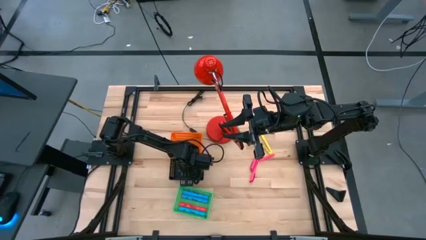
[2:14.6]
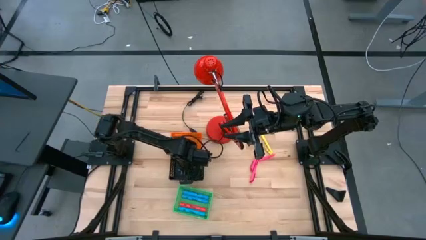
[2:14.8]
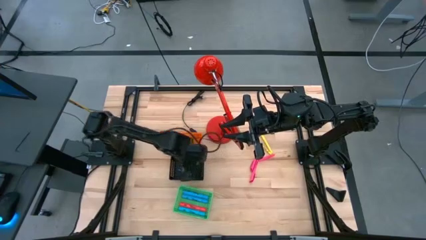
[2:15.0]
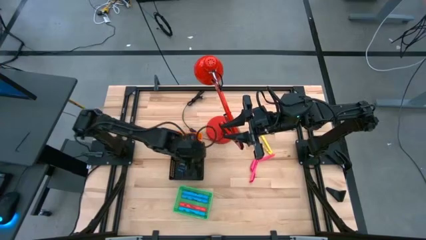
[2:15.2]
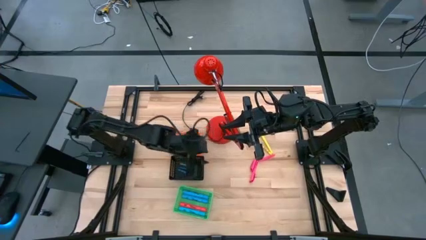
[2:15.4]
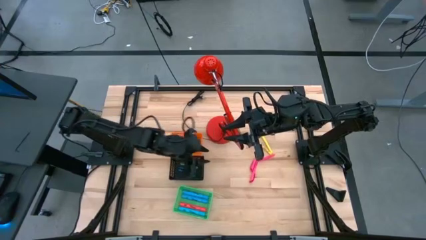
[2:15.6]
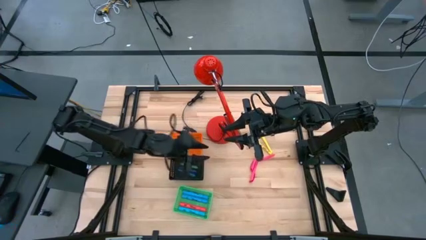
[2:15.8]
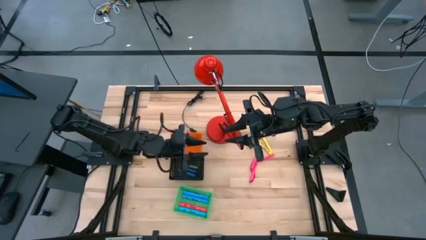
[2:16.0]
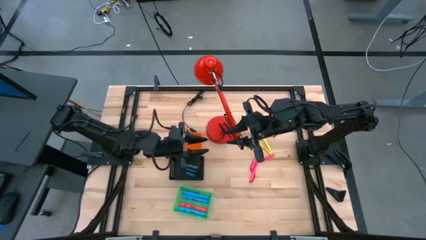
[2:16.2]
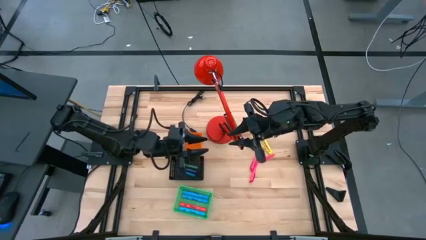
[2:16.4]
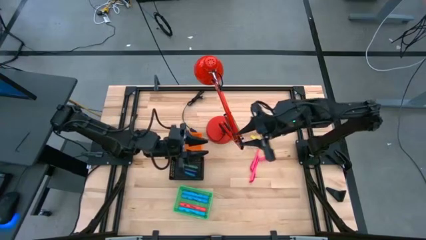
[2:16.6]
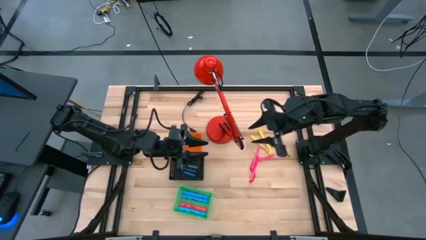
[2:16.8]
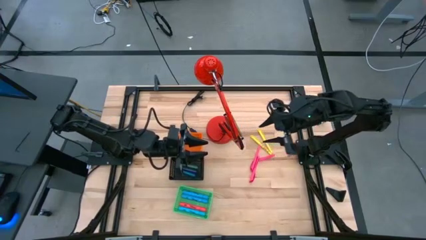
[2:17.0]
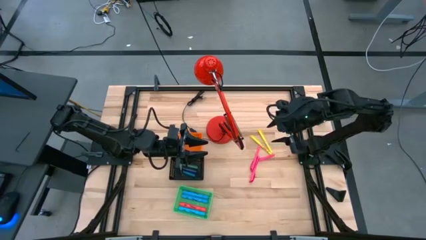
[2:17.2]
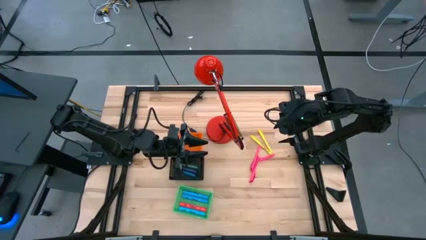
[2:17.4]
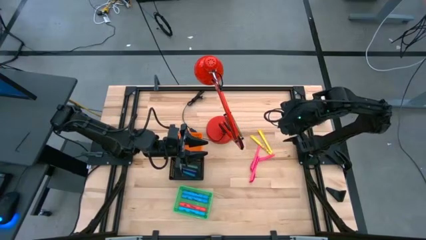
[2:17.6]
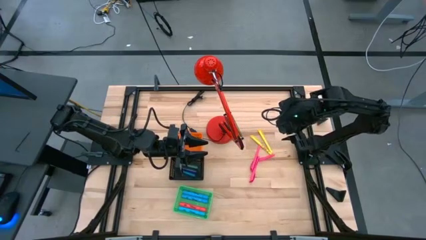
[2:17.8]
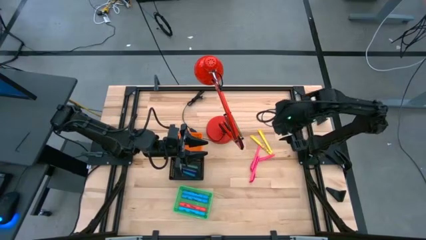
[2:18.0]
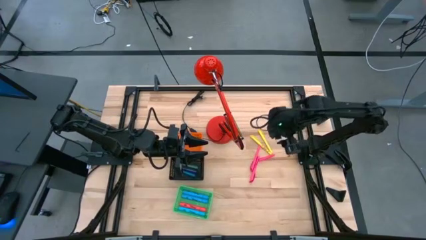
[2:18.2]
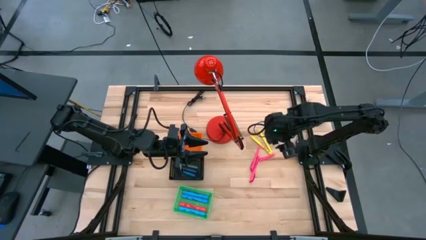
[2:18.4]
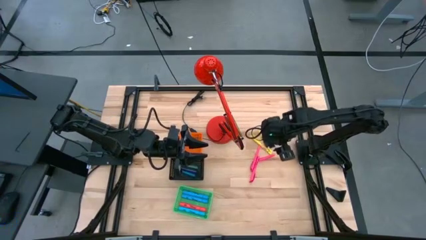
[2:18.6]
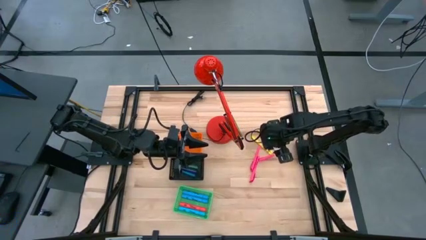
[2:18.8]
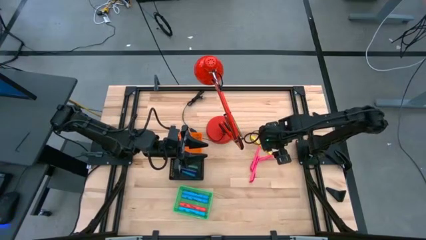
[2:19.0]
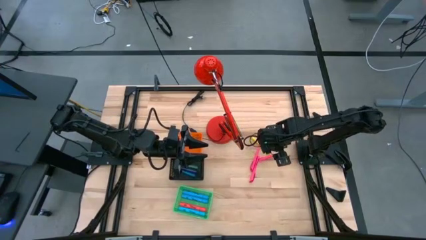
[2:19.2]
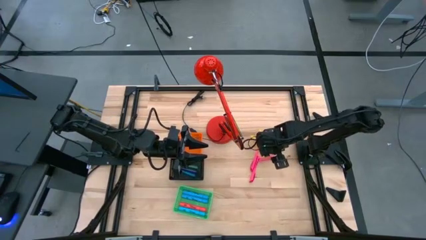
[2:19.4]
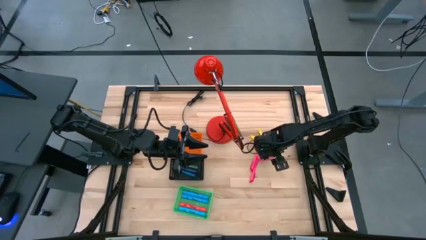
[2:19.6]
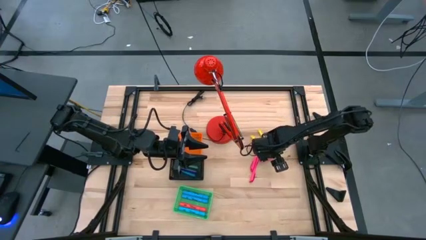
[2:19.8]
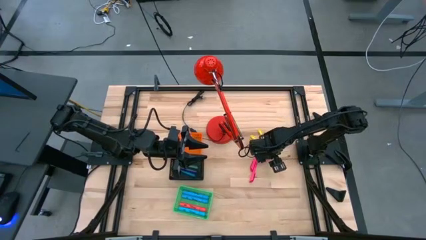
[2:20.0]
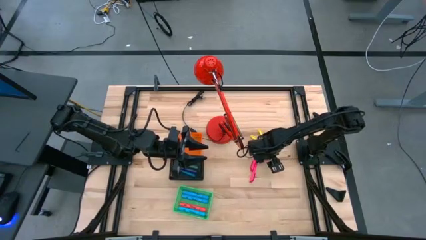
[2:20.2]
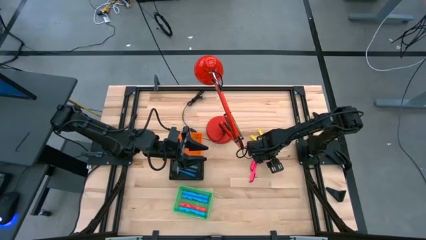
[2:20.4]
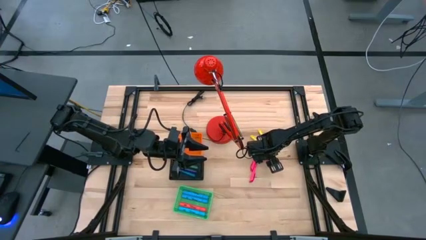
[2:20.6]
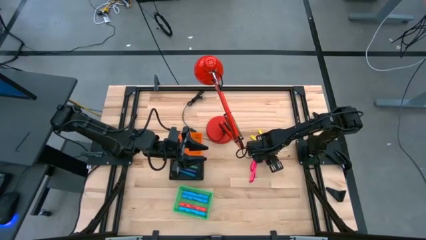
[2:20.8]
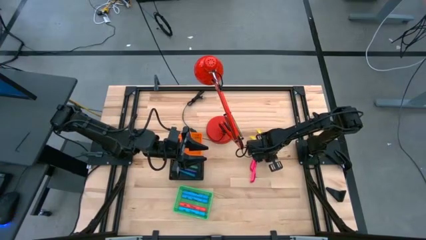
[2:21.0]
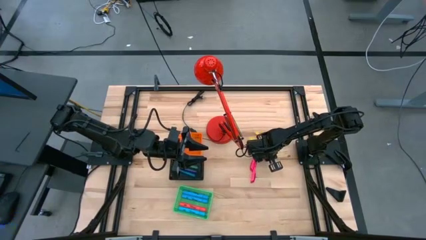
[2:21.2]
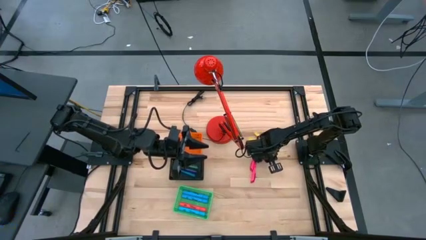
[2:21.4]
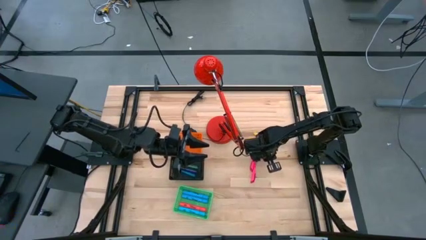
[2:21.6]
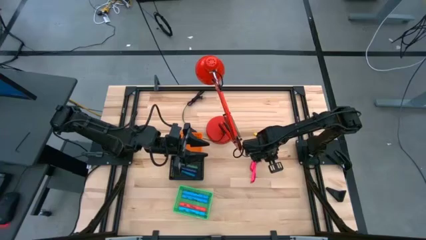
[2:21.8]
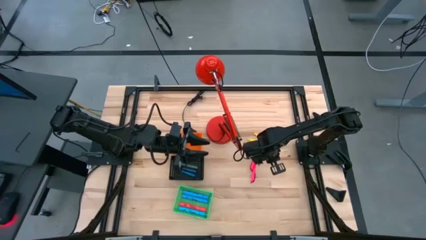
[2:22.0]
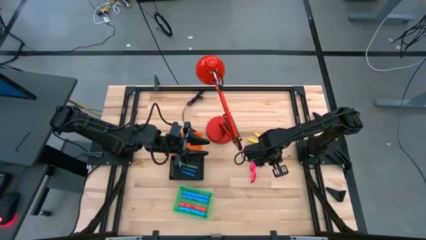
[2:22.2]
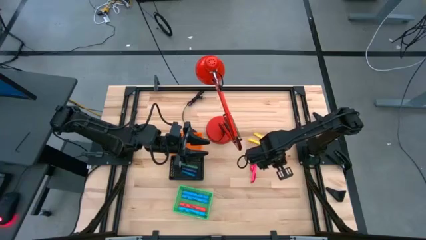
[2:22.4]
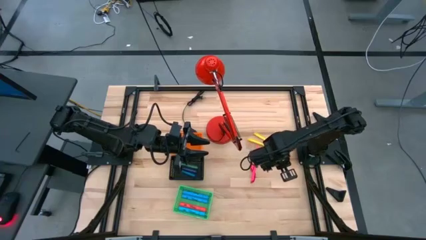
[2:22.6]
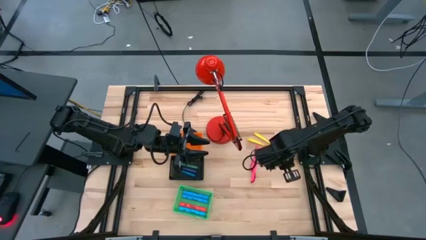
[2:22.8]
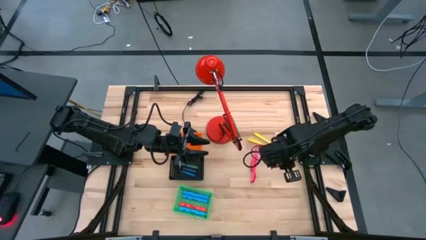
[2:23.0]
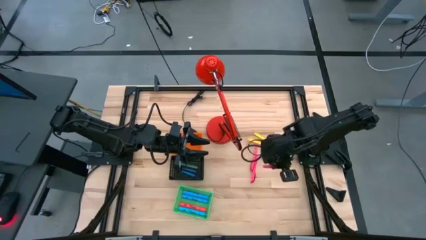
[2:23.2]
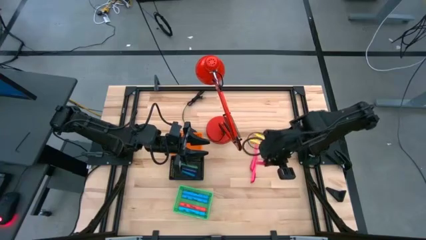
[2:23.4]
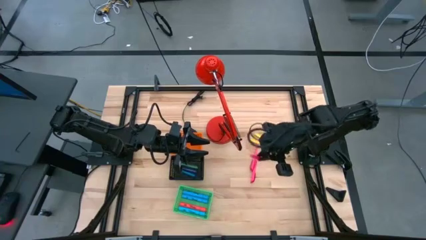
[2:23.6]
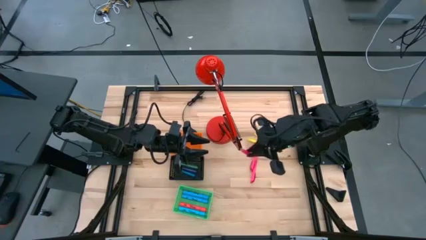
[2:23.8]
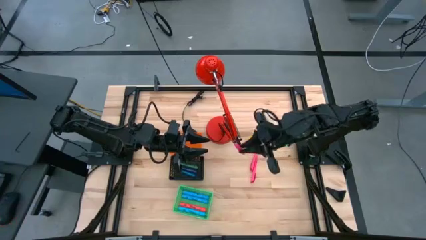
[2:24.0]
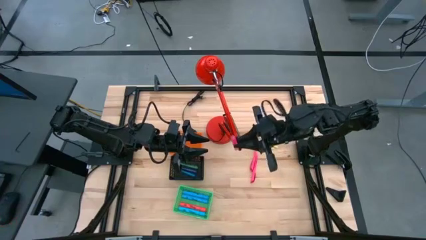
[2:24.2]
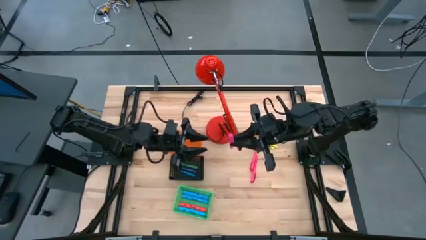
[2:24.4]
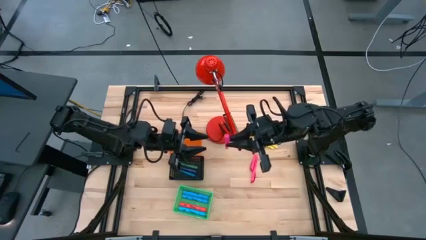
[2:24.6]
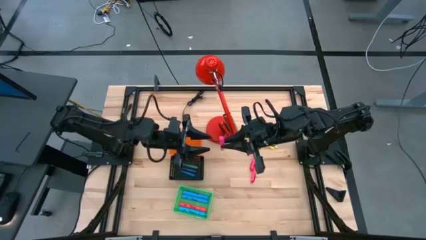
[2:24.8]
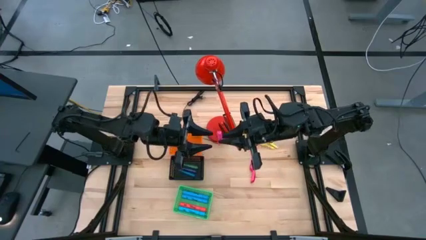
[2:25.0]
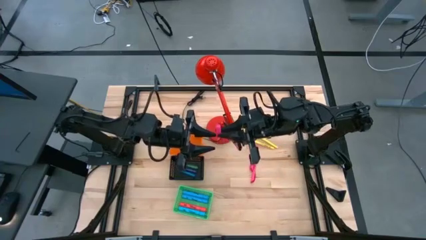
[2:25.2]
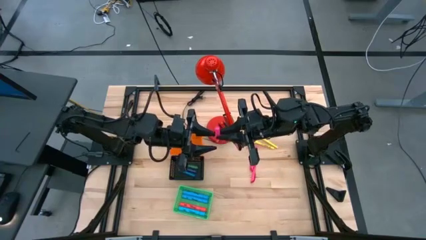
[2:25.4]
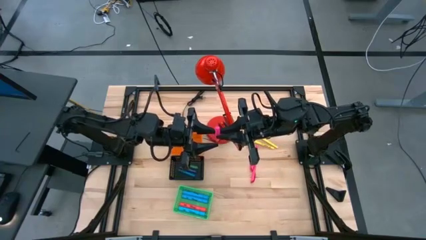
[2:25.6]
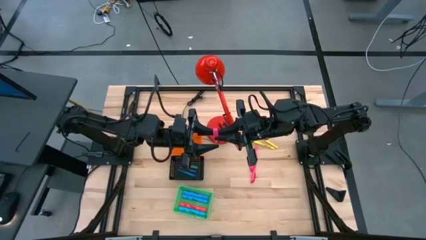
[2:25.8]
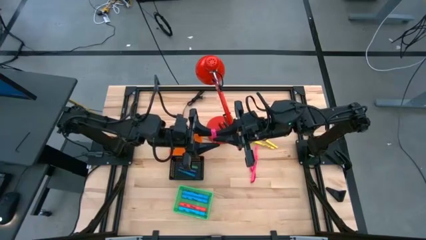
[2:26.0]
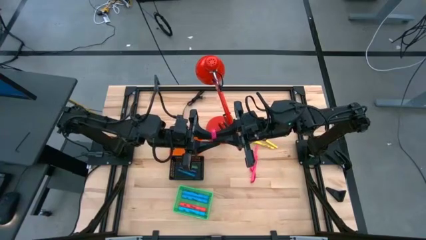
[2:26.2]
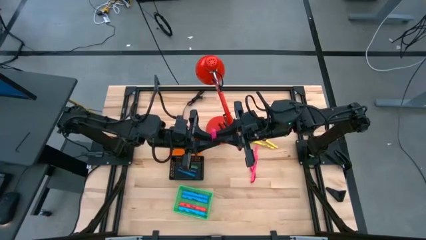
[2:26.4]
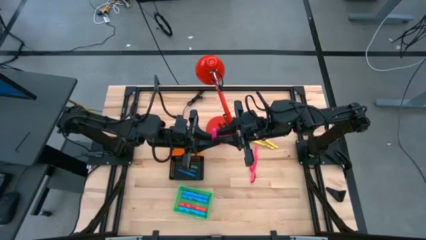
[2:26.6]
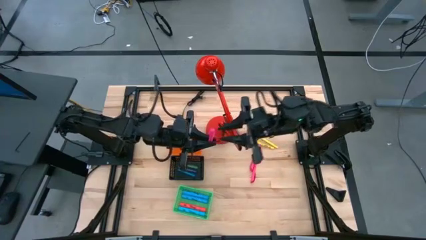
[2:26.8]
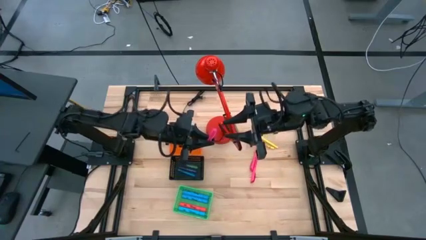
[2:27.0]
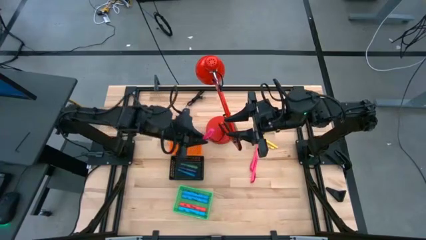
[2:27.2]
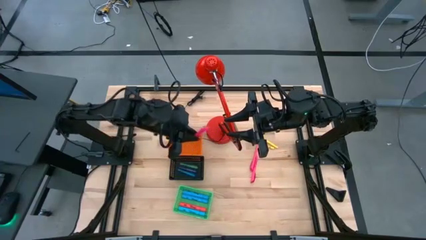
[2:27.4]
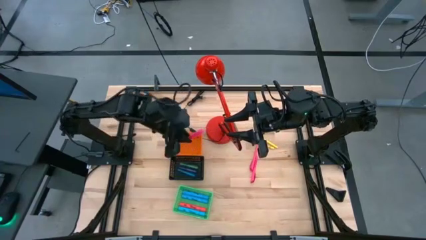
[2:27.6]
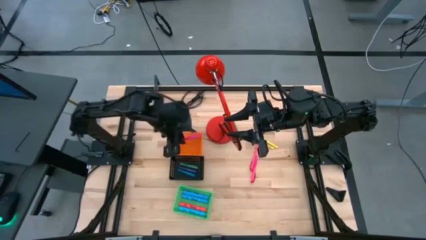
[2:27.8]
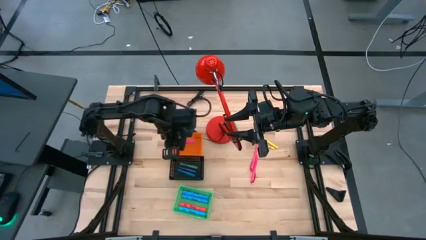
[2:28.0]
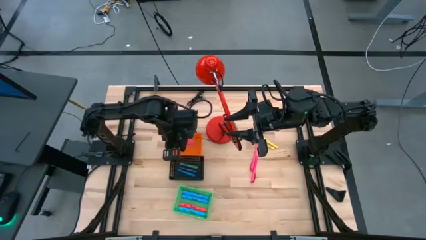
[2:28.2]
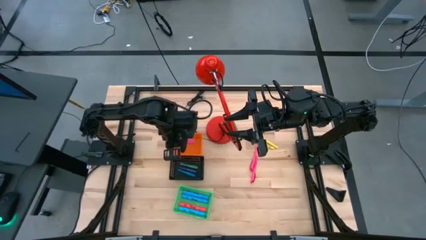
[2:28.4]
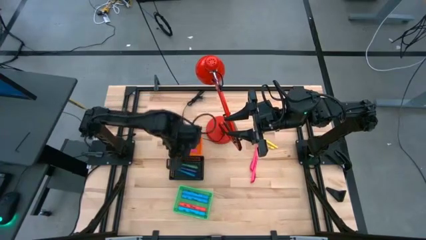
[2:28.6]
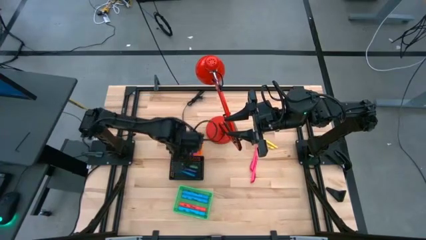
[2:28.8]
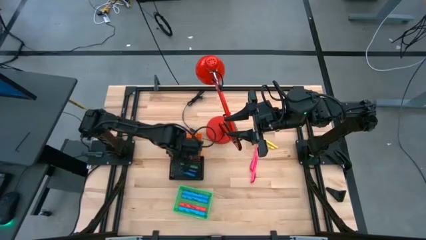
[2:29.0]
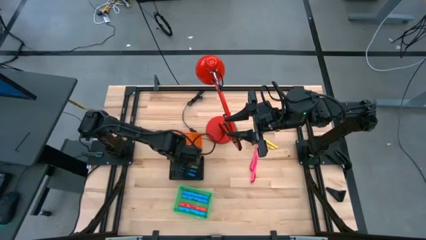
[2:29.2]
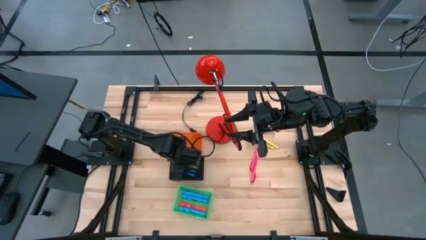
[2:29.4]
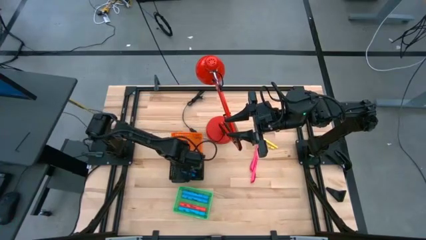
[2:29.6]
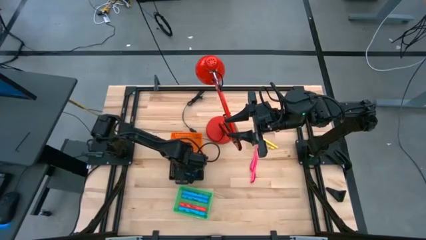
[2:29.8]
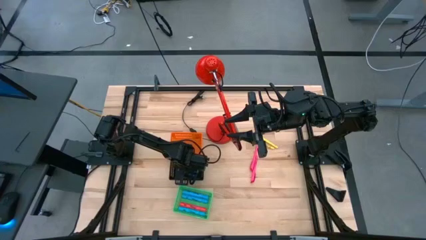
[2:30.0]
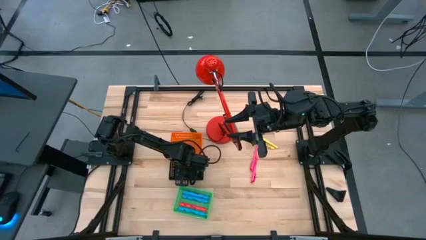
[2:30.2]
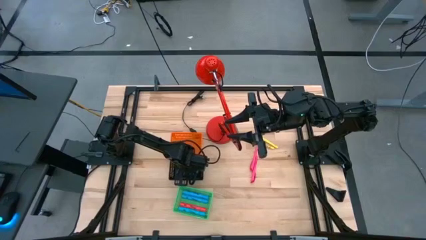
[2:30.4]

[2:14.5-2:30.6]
Task: Pick & Place Markers
Put the pink pen into the bin
